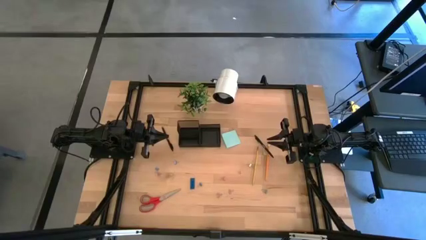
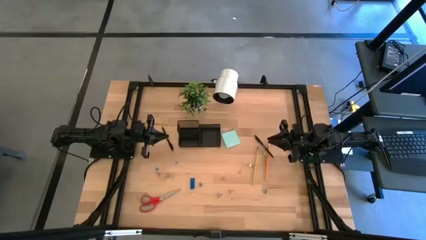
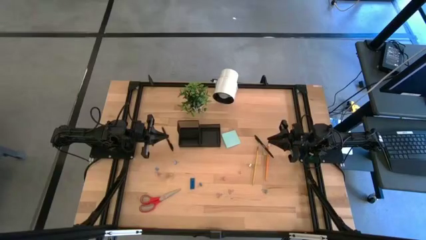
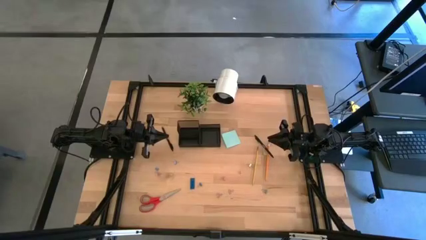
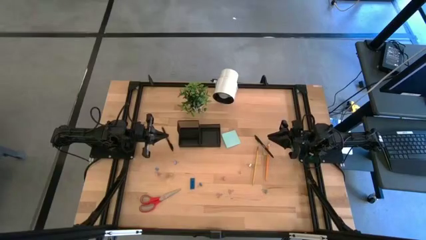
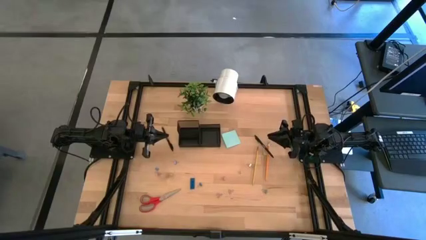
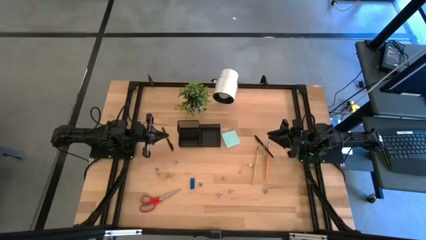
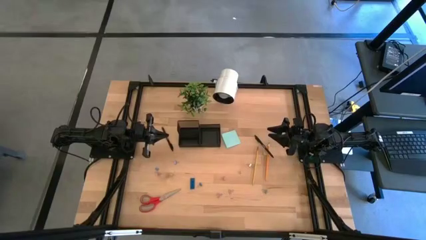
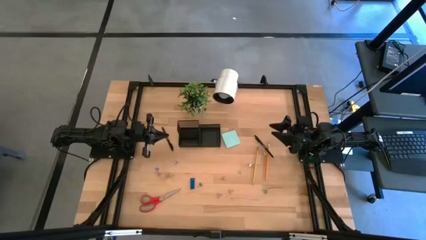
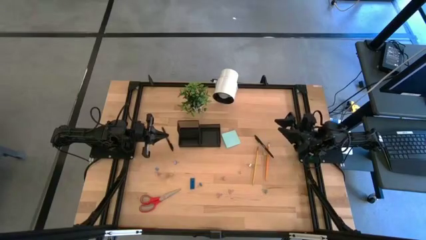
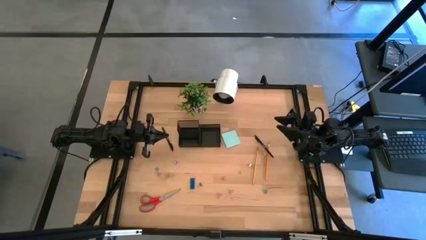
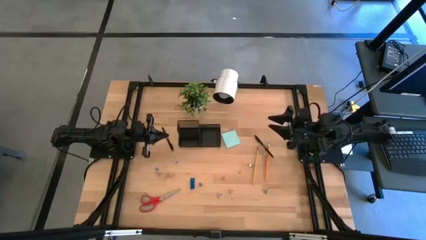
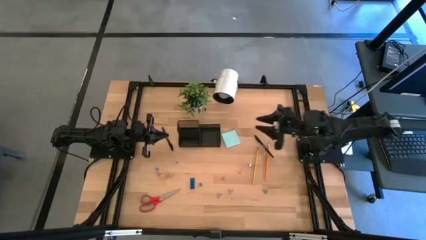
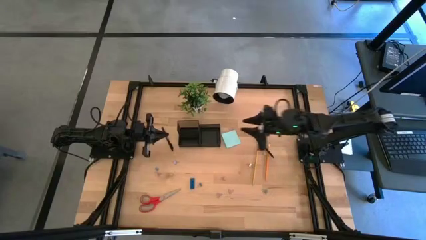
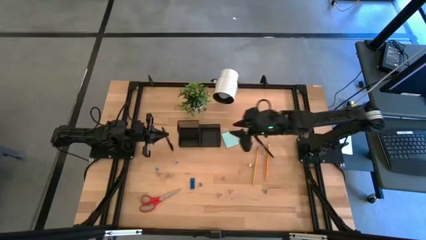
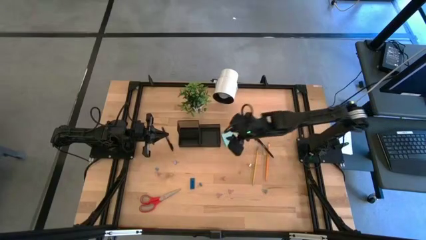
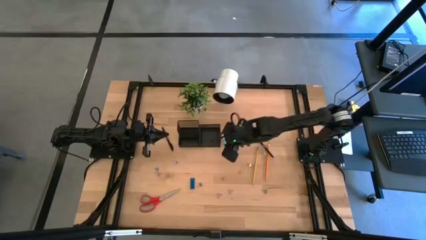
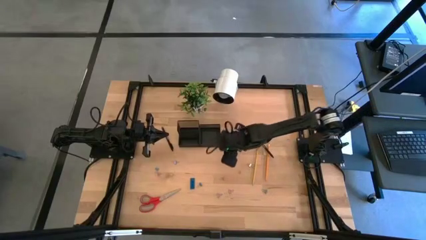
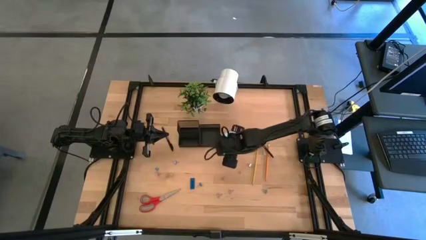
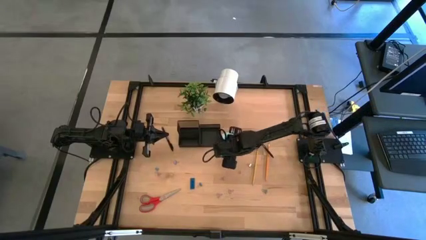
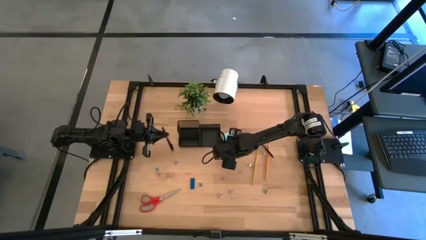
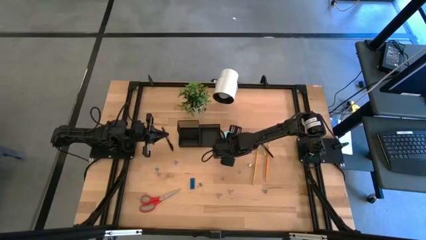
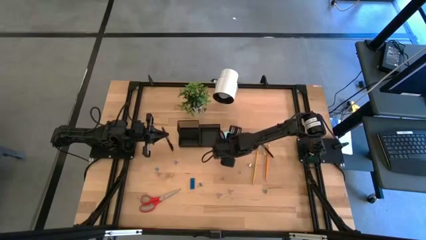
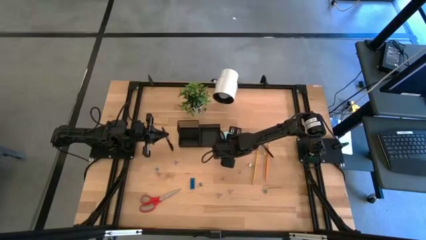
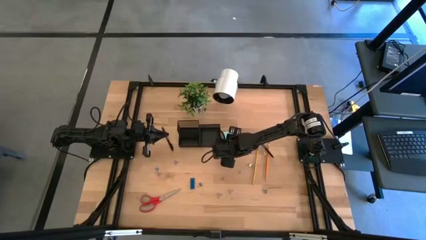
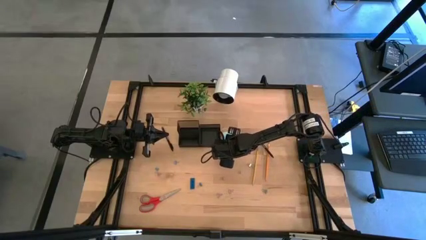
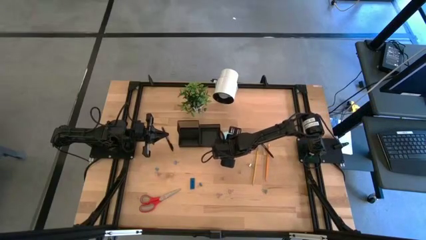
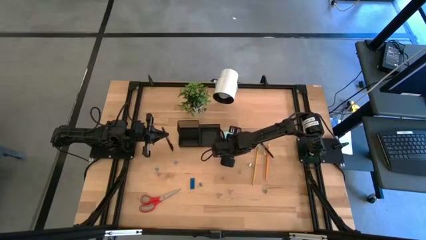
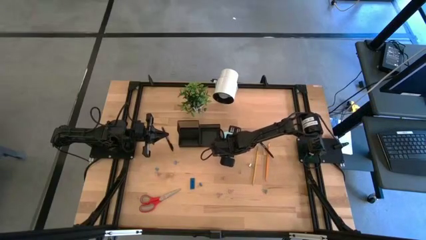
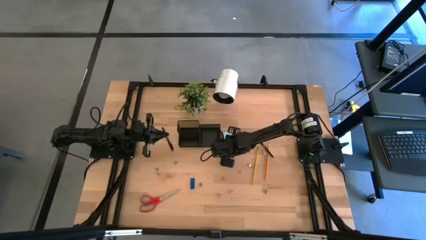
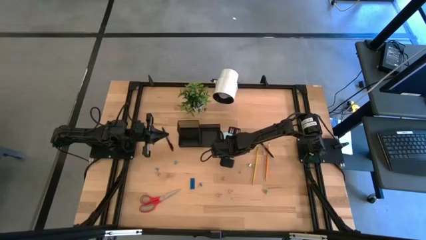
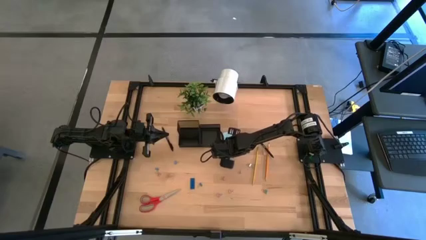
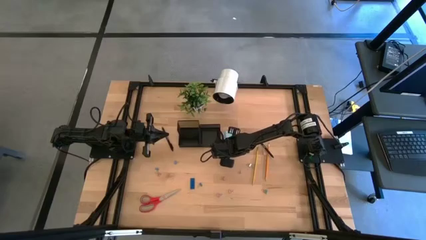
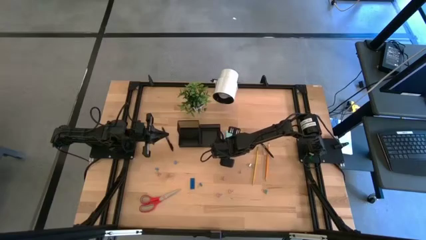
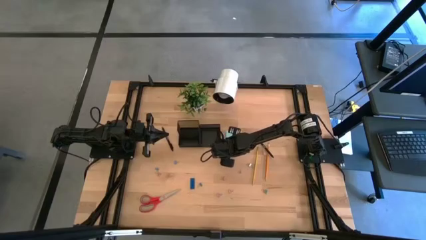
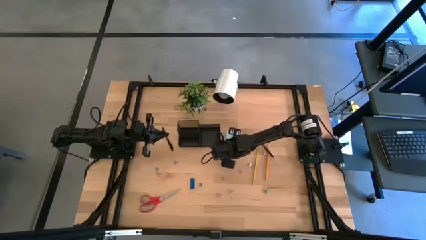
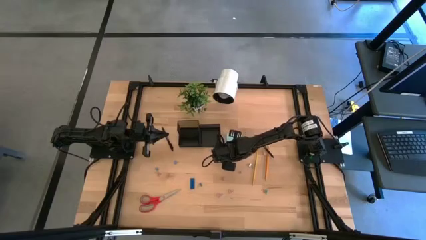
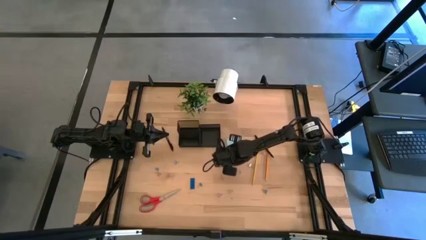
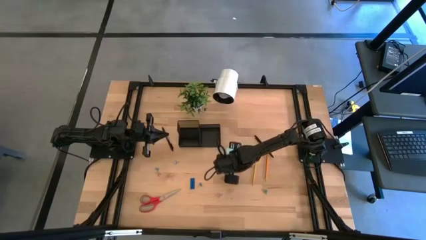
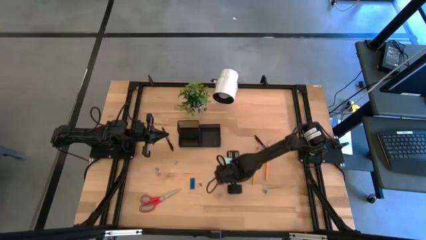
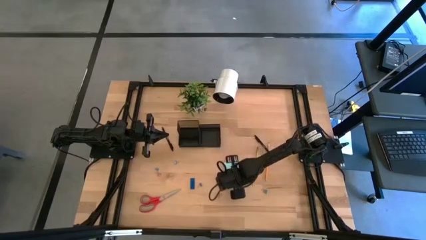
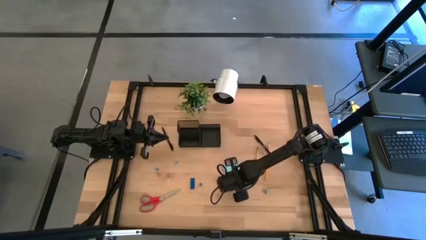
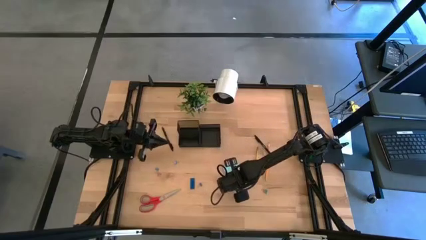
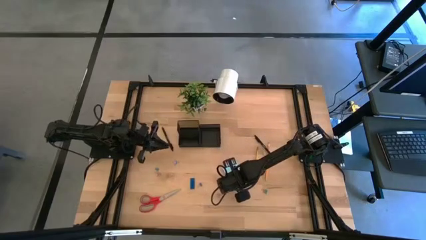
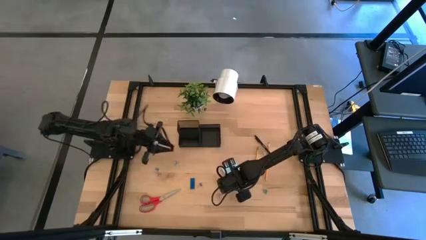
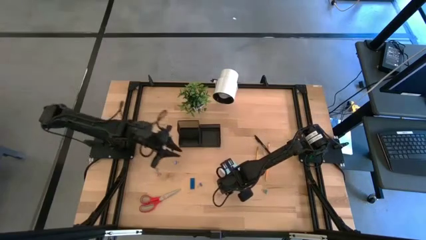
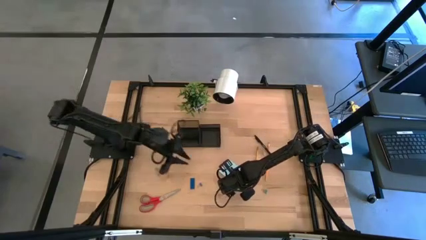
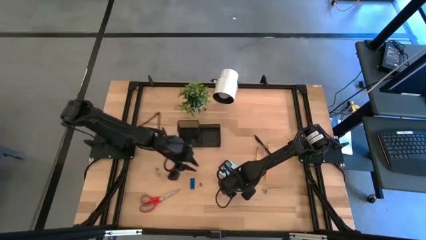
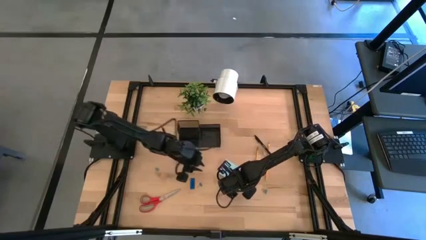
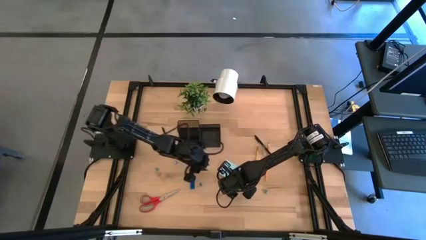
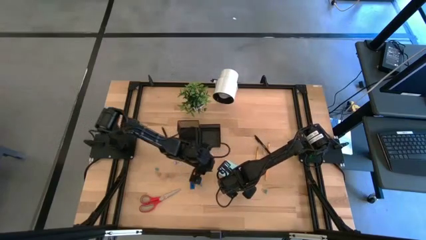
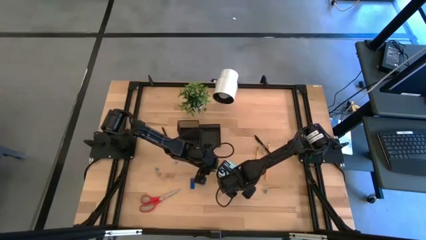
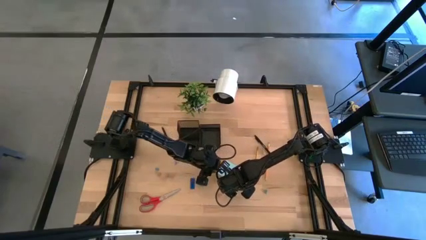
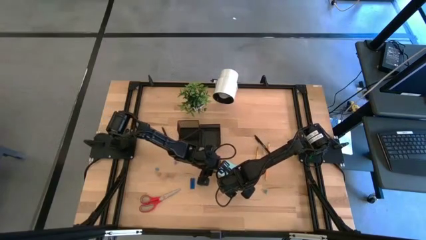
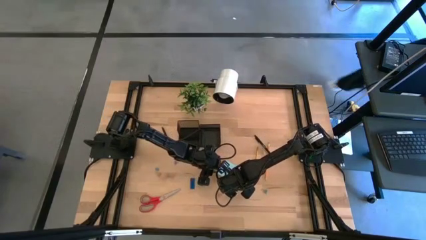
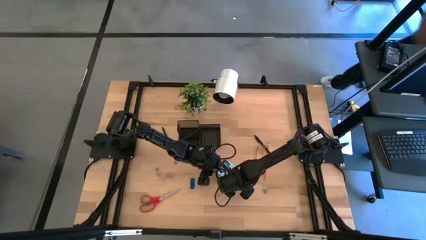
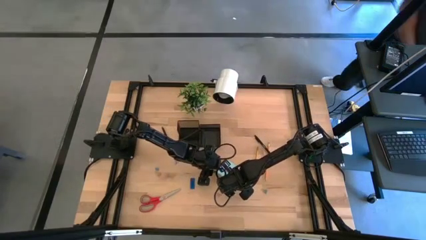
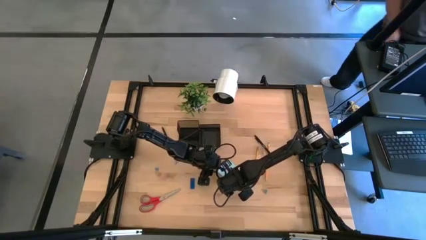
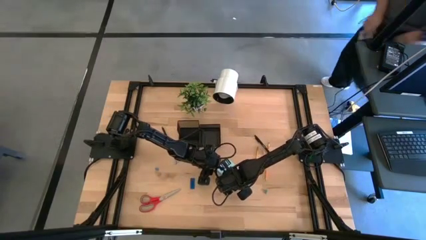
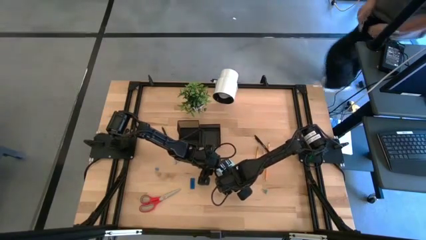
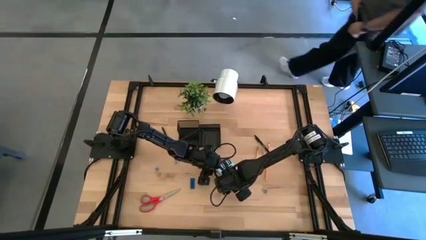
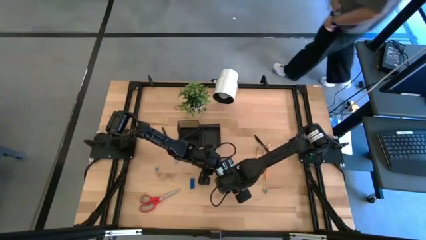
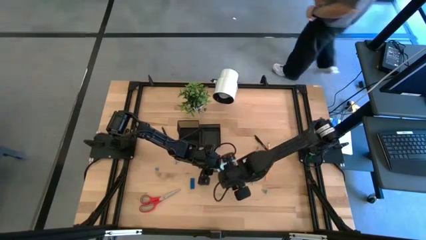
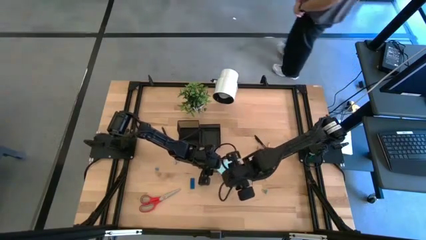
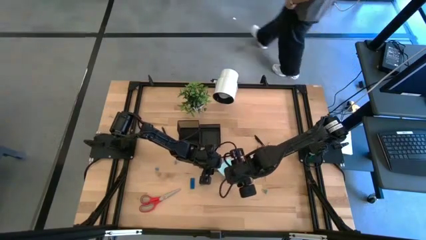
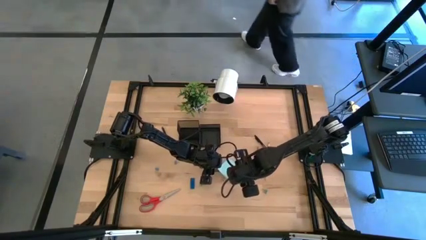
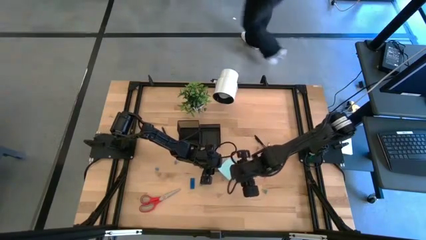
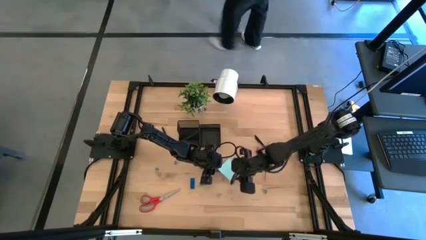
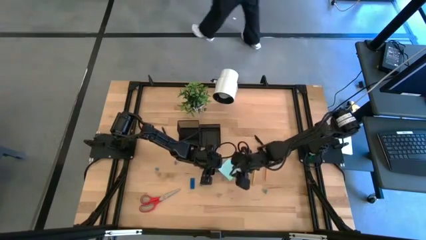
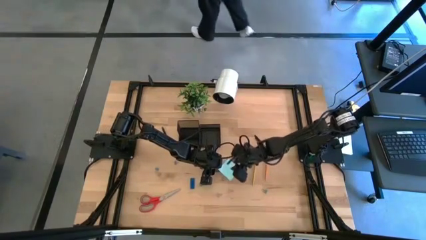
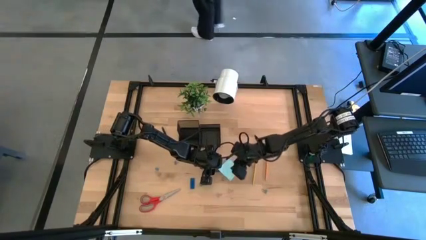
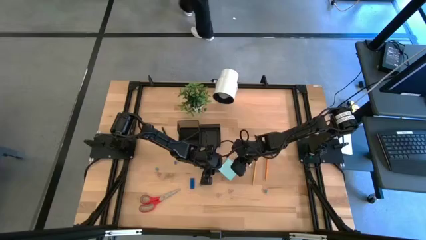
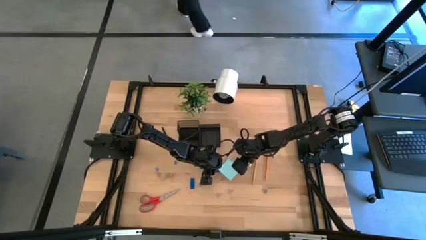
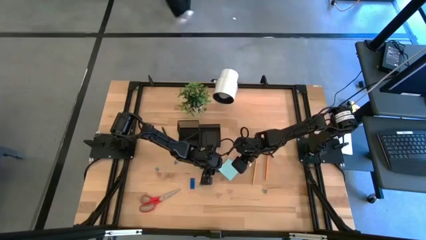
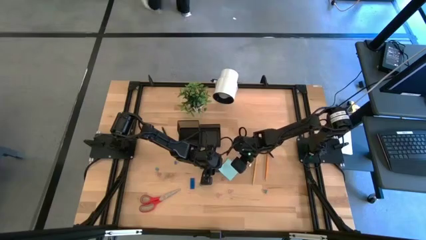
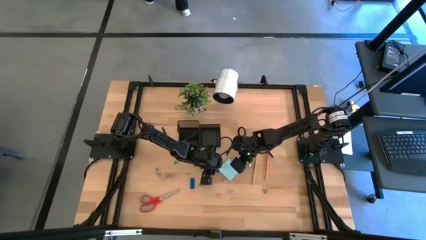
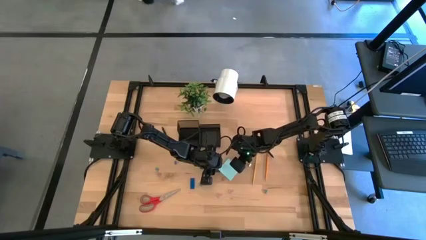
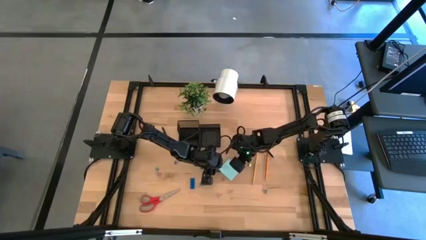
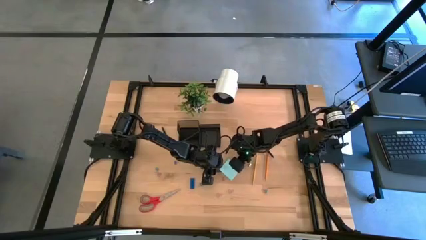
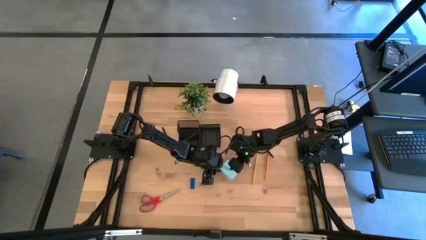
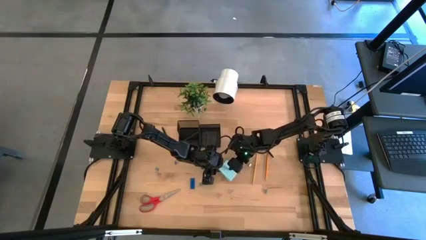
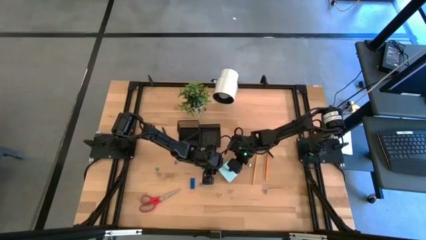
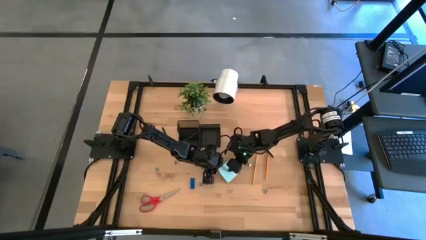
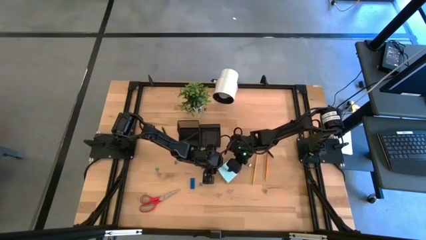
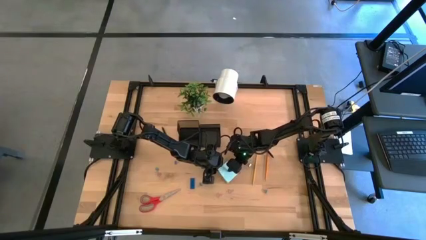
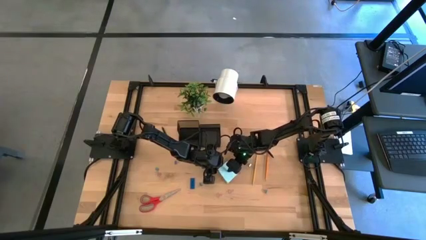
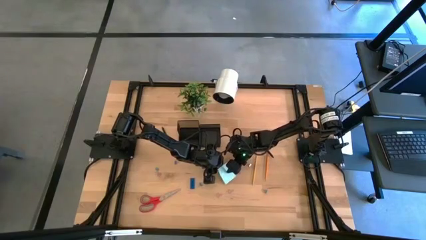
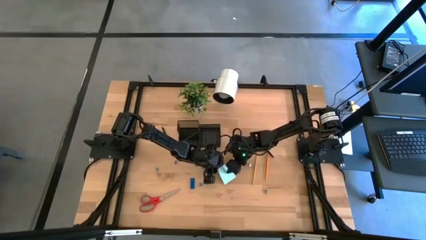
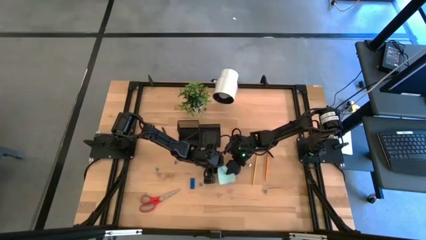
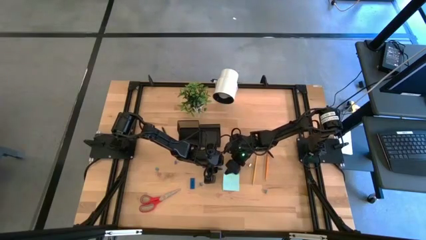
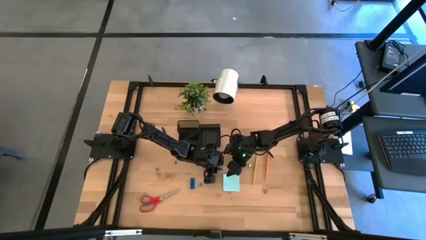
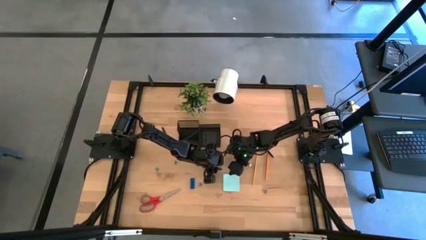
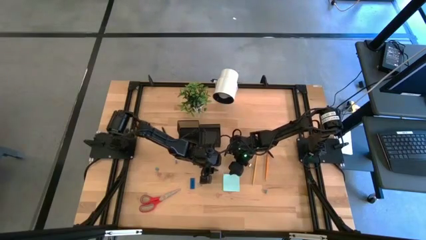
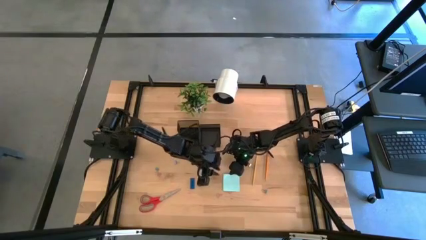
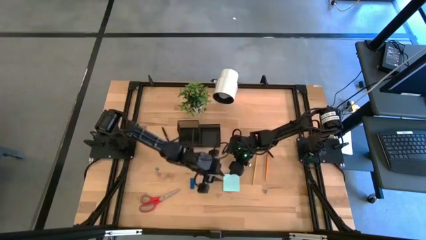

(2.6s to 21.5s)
Task: Pick and place office supplies into organizer
Put the blue sticky note into the black desk organizer
